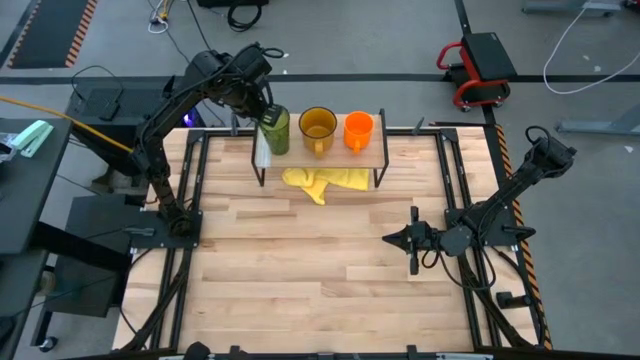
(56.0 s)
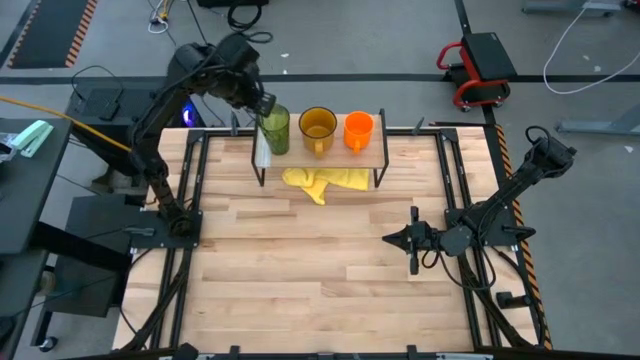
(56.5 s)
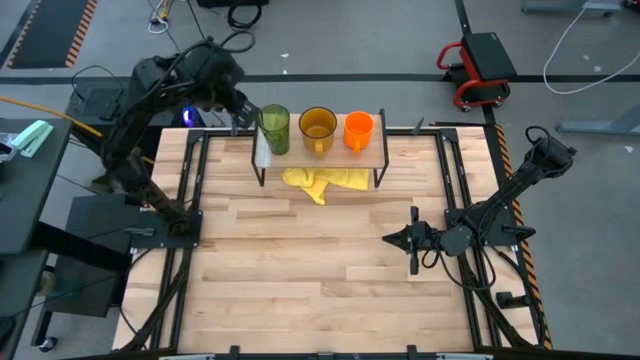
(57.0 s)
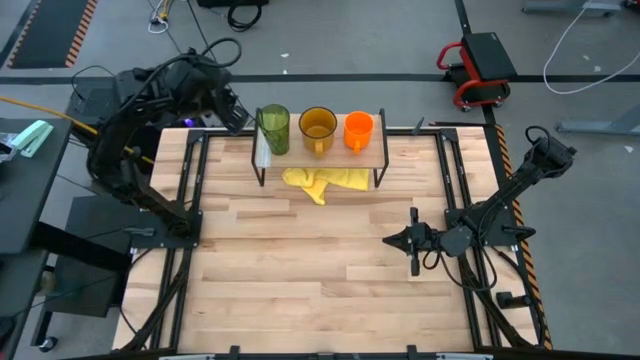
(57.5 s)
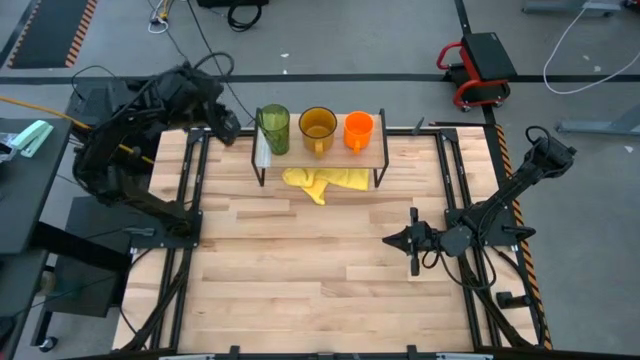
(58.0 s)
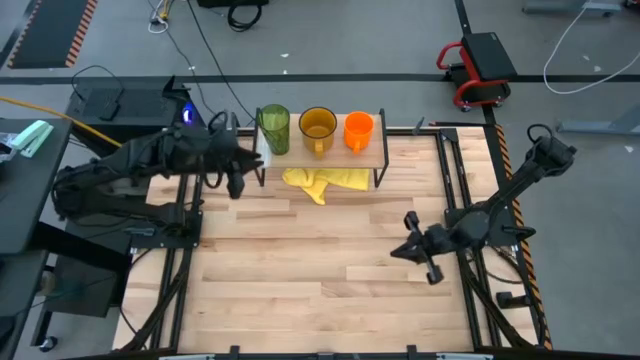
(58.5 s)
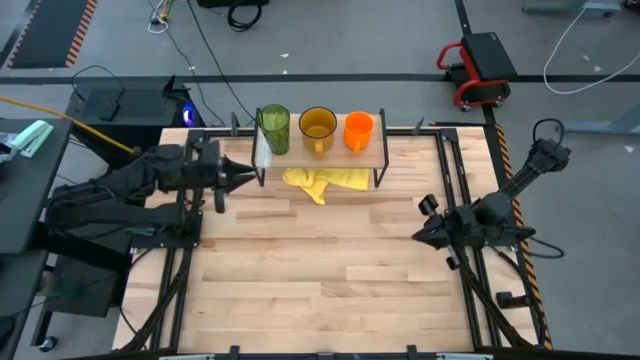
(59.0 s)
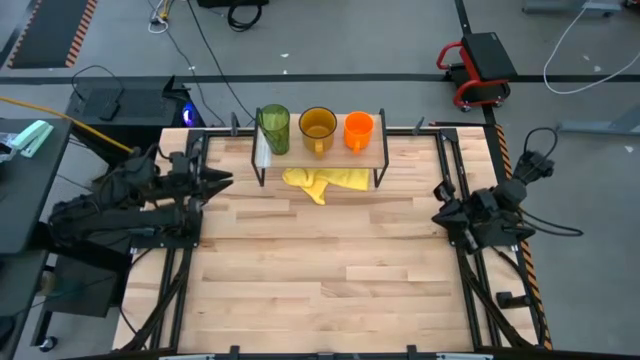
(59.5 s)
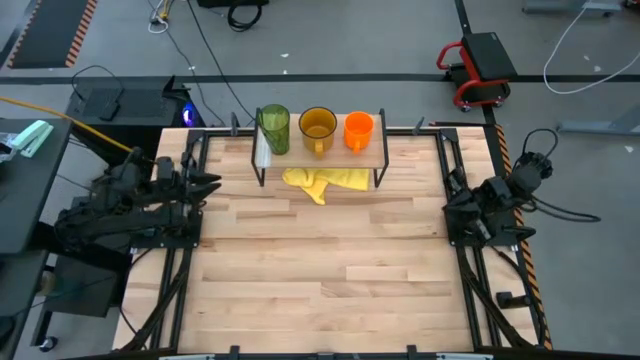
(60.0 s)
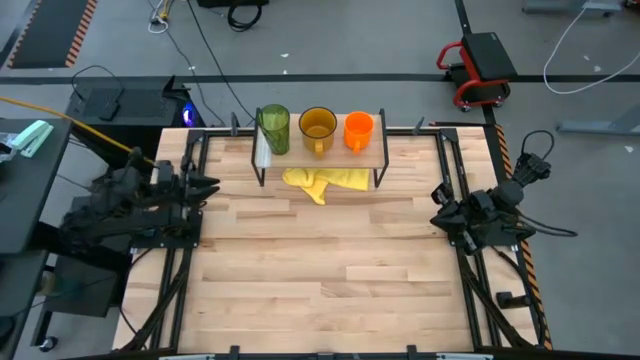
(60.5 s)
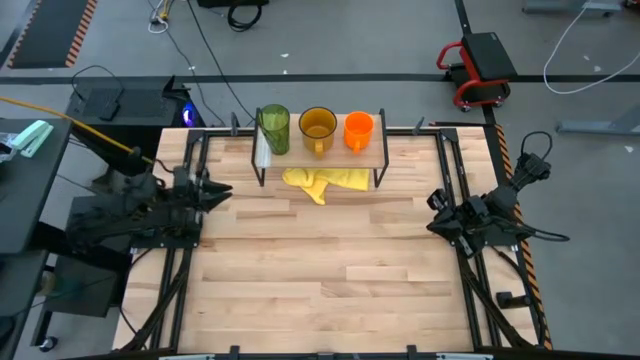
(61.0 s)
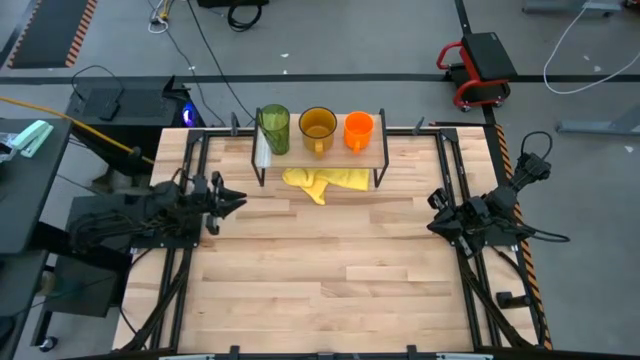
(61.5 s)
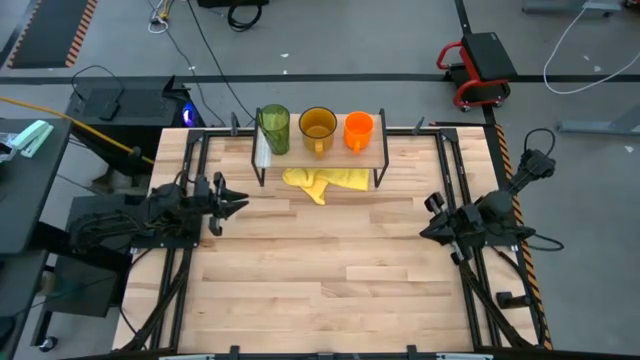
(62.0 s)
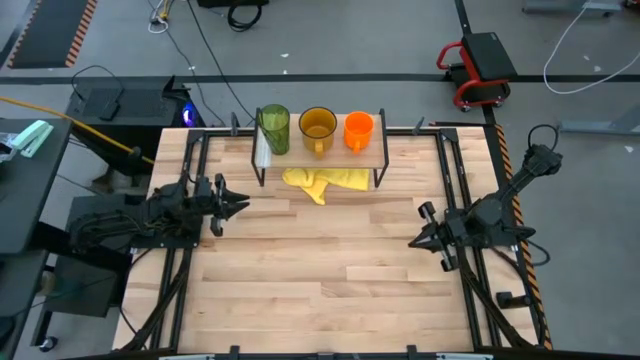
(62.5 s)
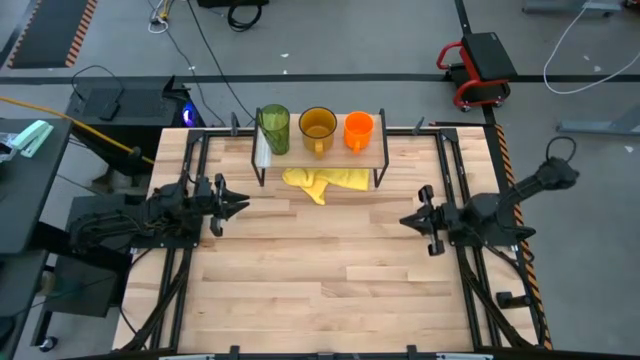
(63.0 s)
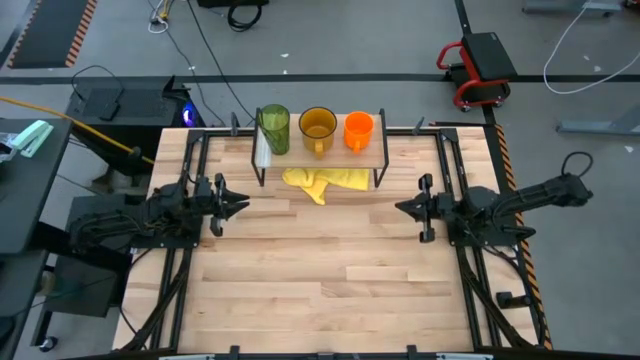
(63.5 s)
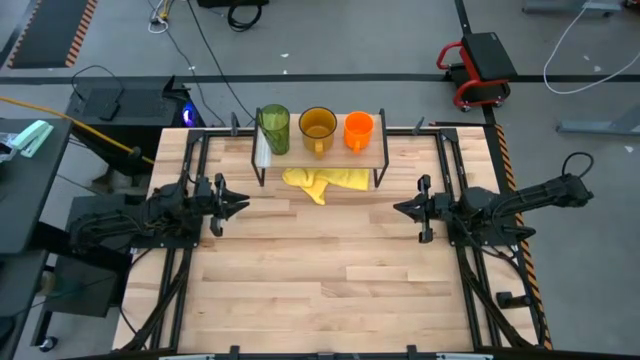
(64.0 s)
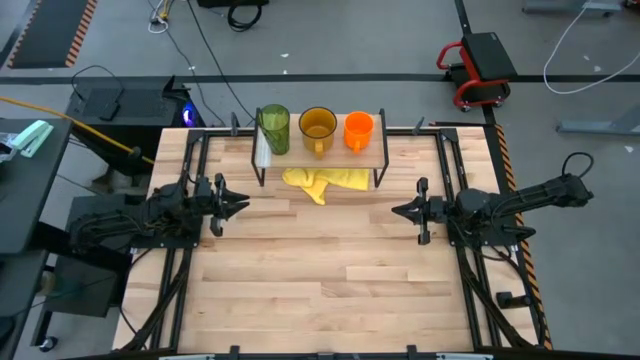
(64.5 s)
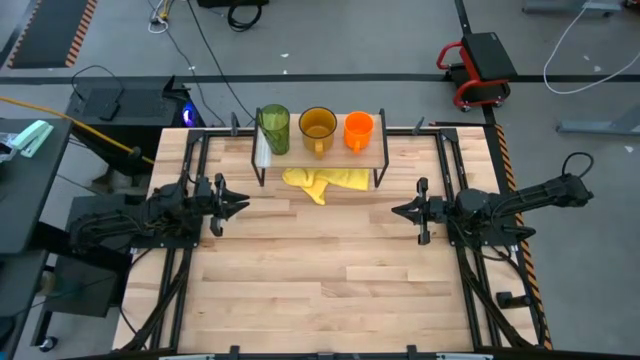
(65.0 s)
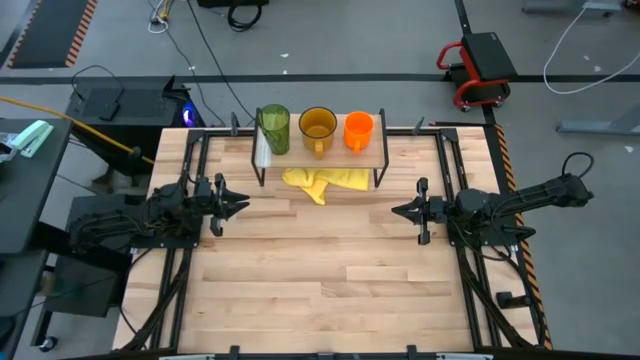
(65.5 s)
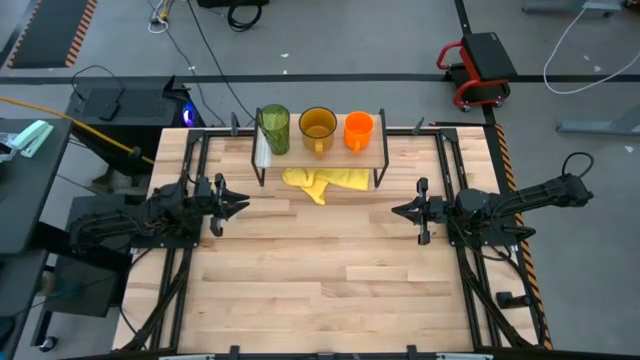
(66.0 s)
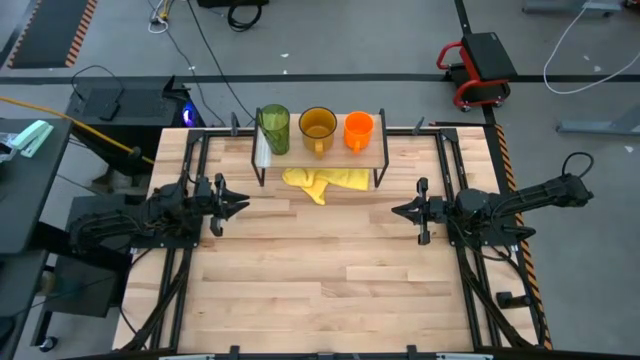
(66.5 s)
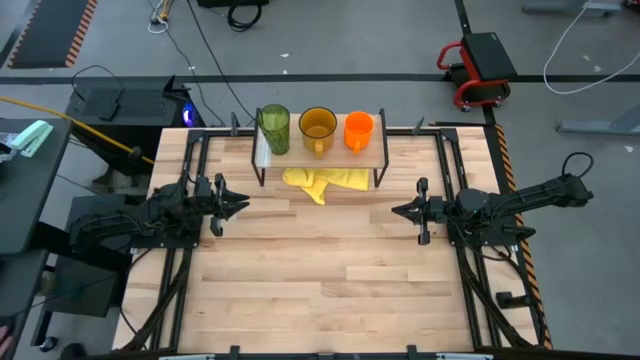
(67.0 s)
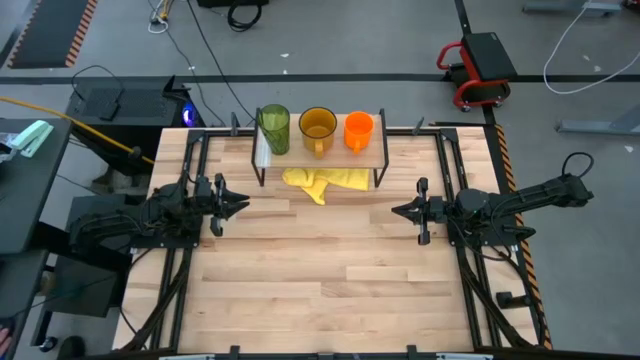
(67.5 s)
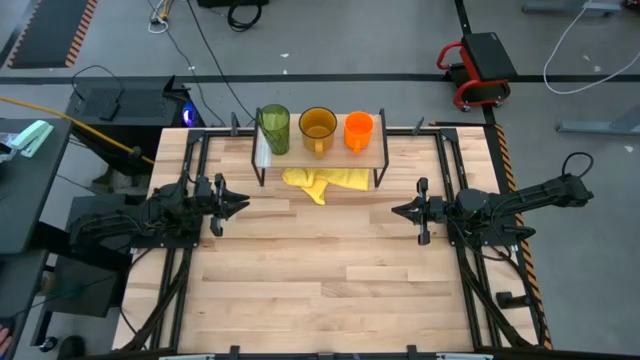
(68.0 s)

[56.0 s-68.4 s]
Task: Stack small to large cups/mugs on shelf
Return to Home Position

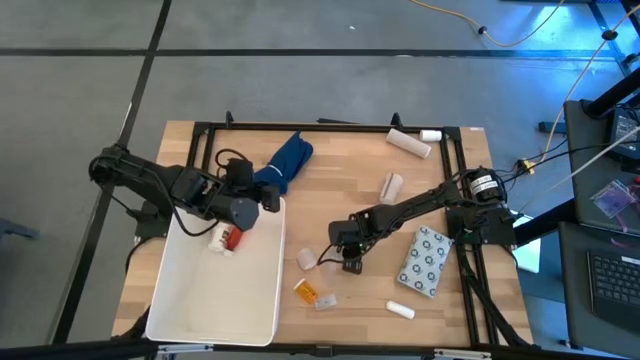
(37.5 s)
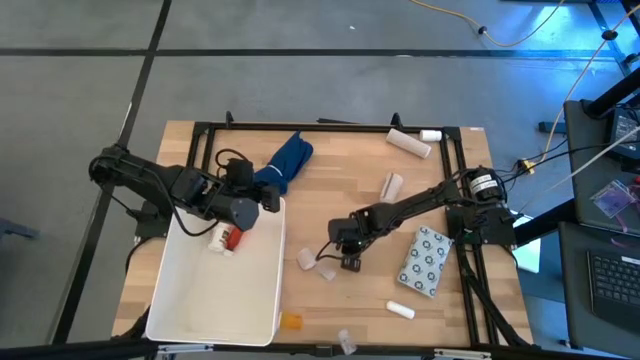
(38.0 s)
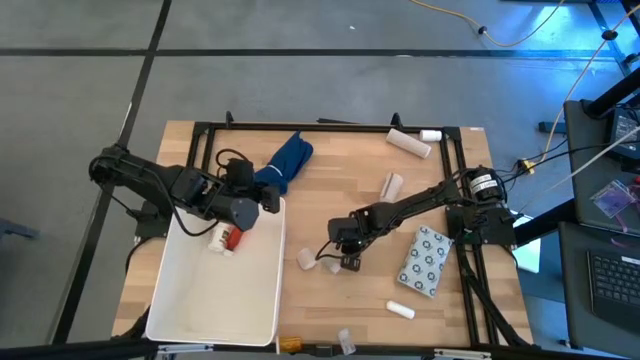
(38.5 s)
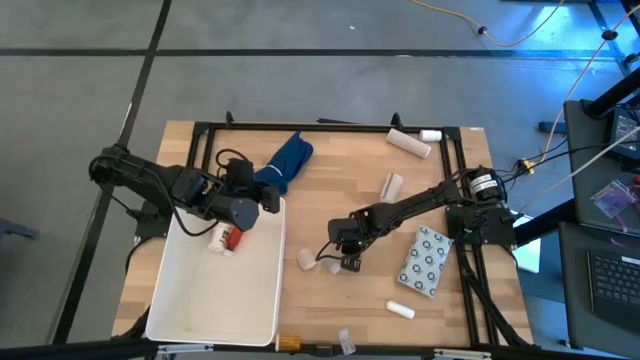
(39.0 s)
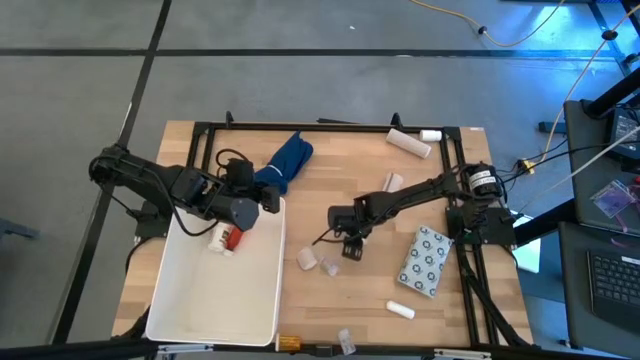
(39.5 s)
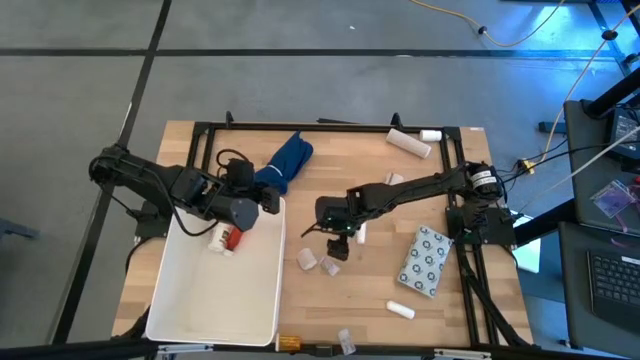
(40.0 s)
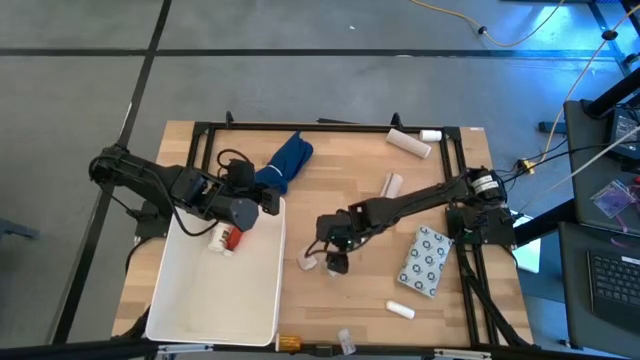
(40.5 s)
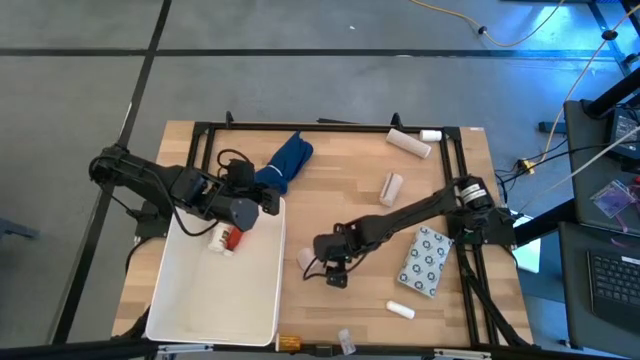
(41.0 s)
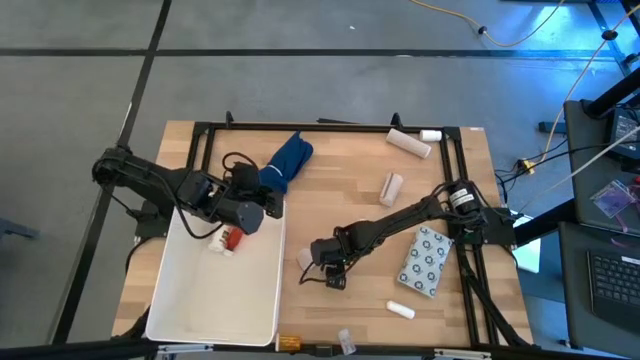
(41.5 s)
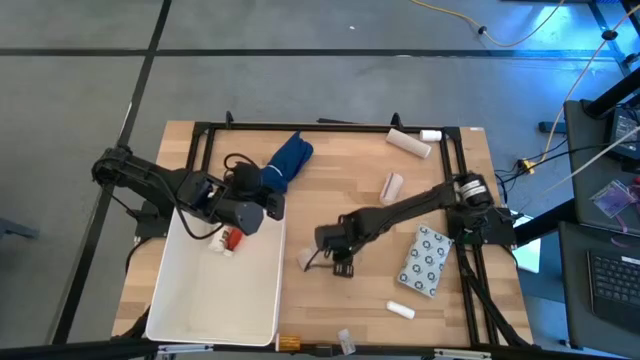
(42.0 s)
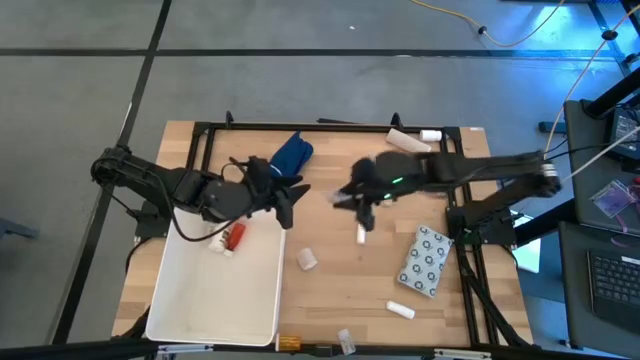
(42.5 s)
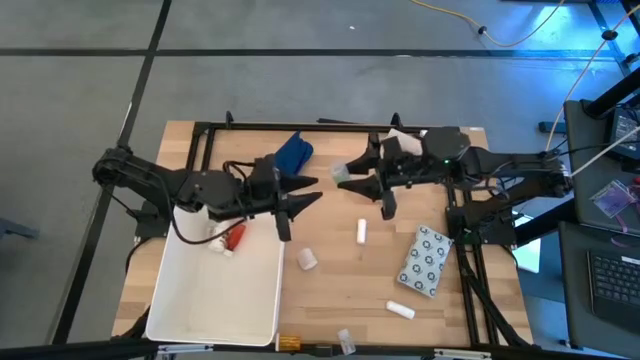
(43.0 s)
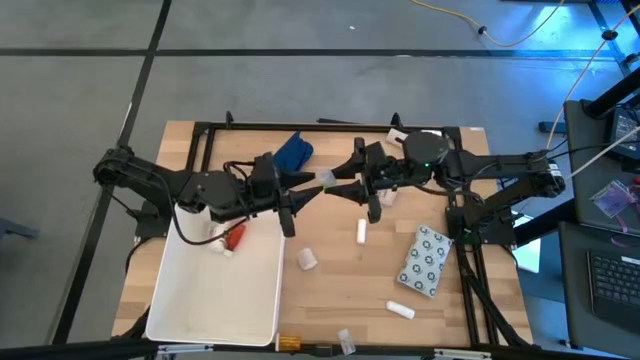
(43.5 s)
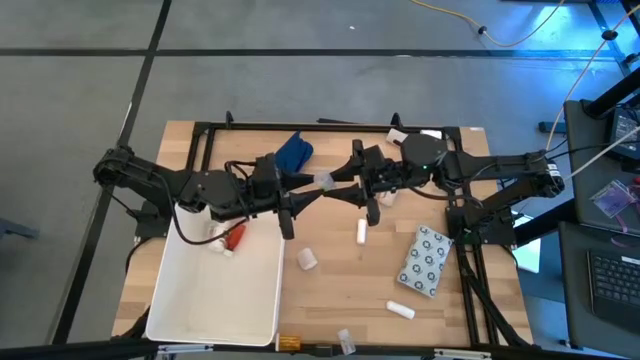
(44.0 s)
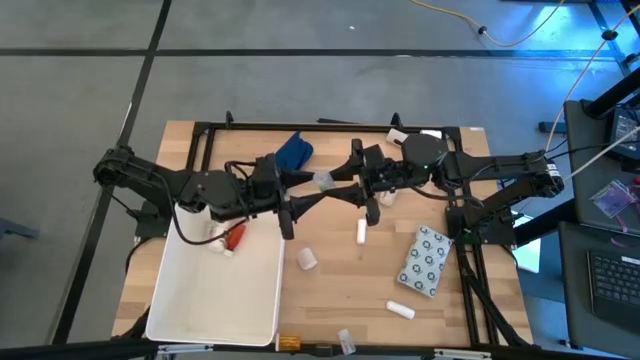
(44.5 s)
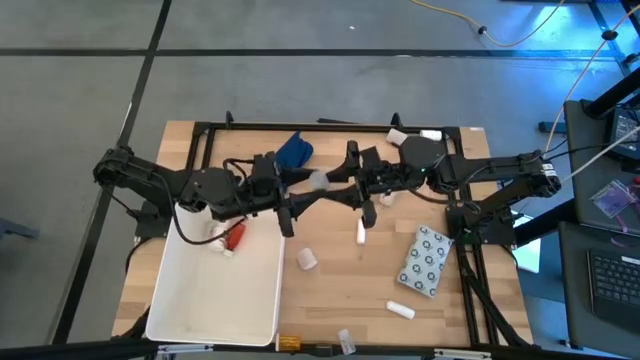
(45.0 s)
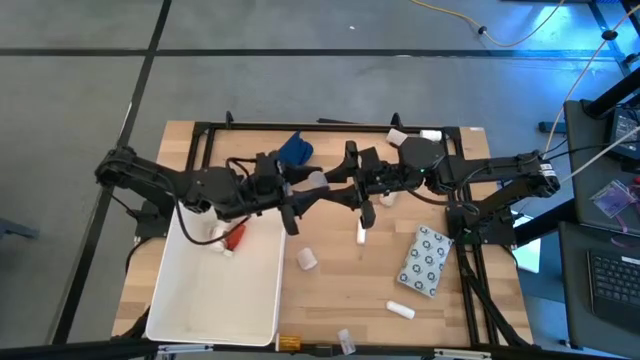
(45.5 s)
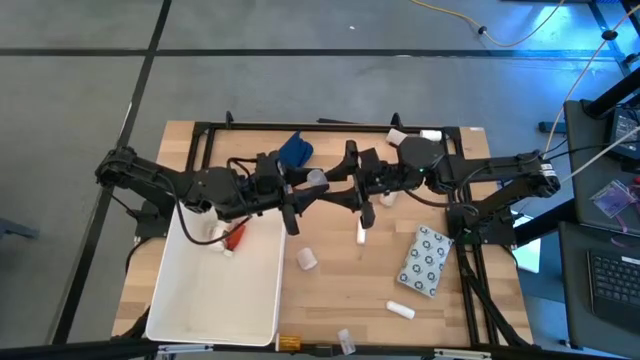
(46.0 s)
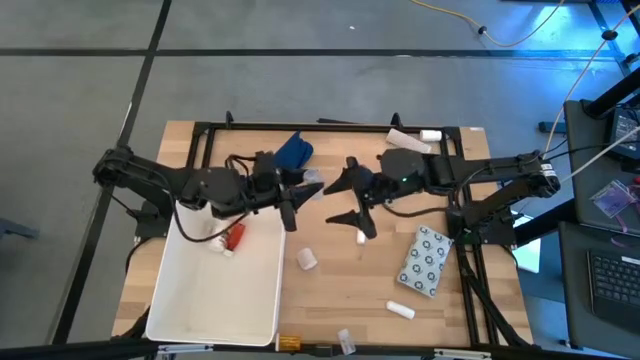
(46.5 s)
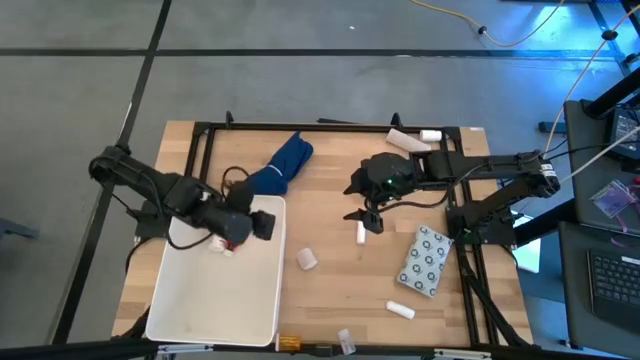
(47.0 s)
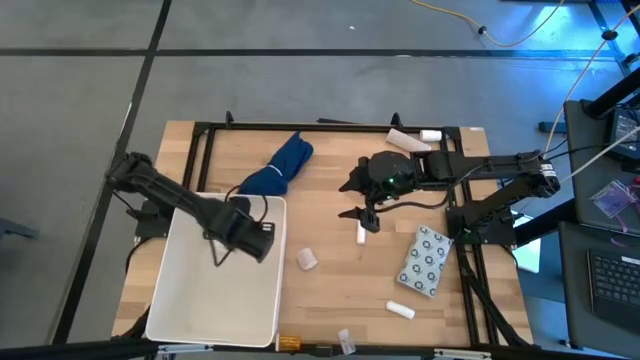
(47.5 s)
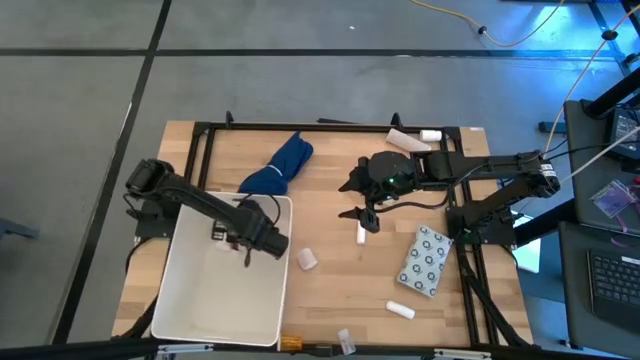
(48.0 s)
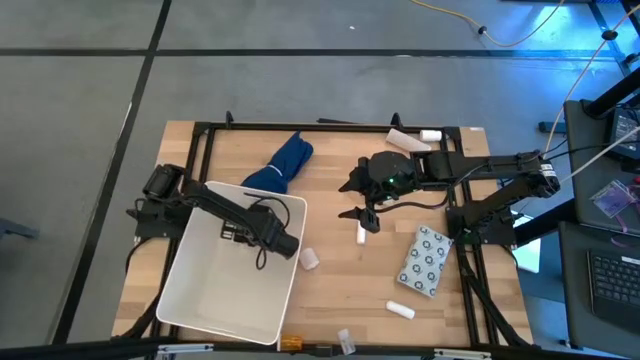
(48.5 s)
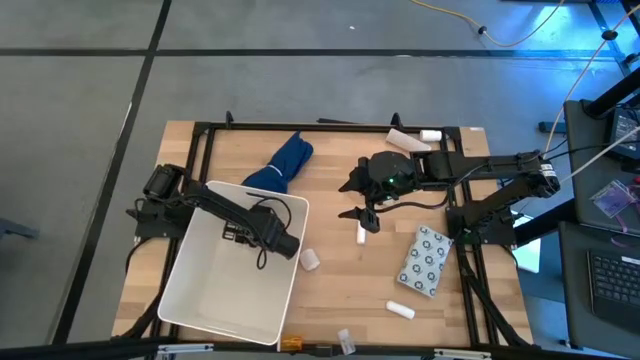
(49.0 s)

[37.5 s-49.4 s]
Task: Pick & place medical supplies in basket/bin
Put the top transparent medicine bottle into the white bin
